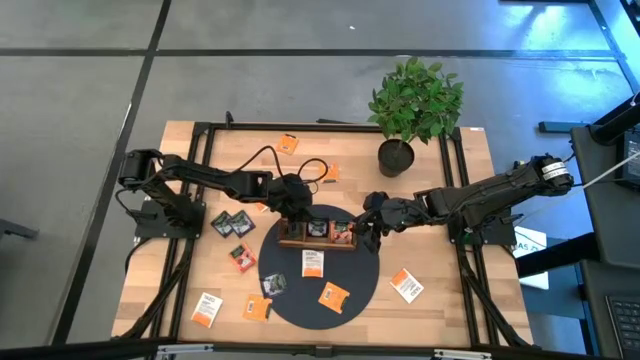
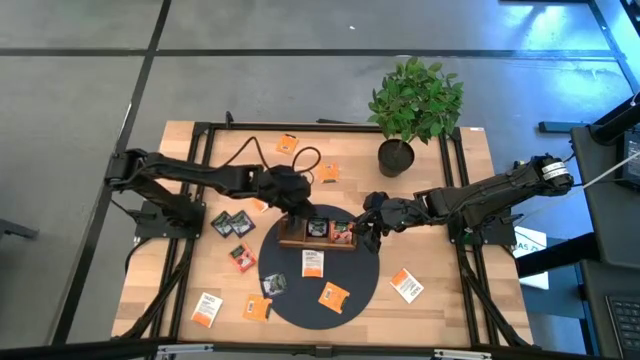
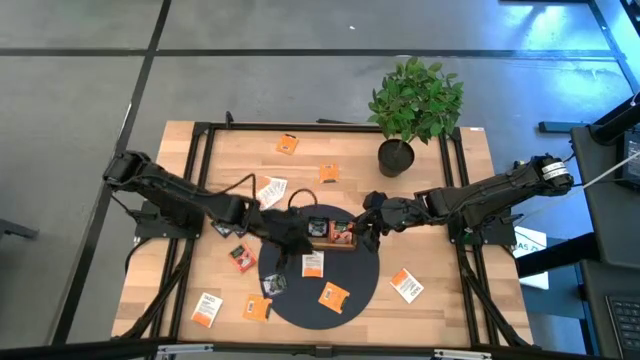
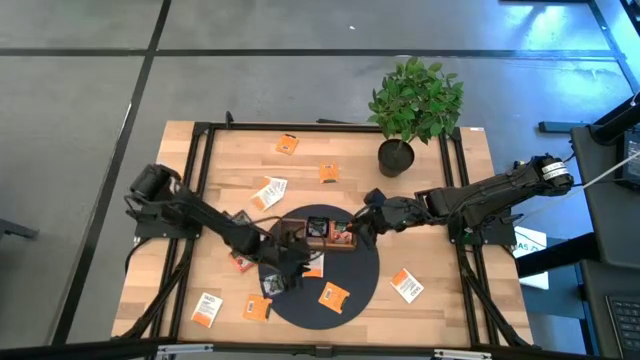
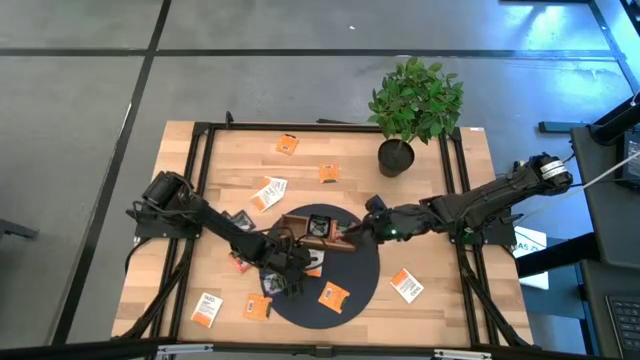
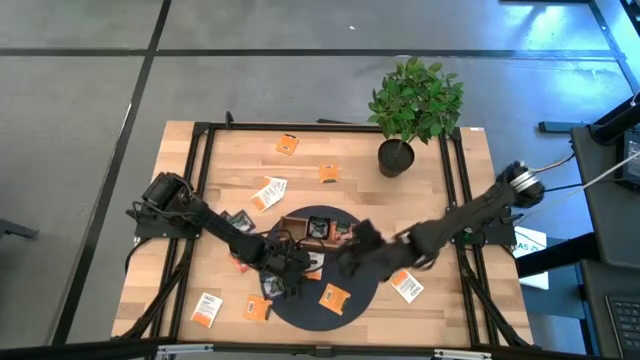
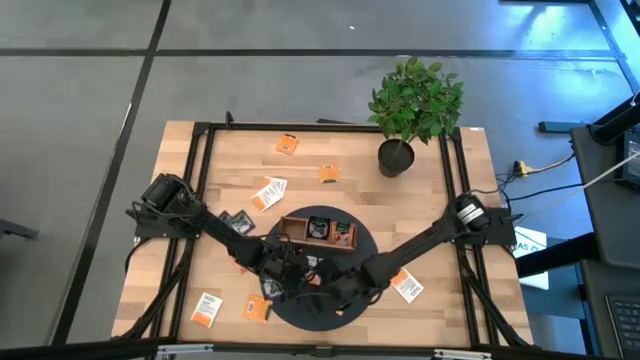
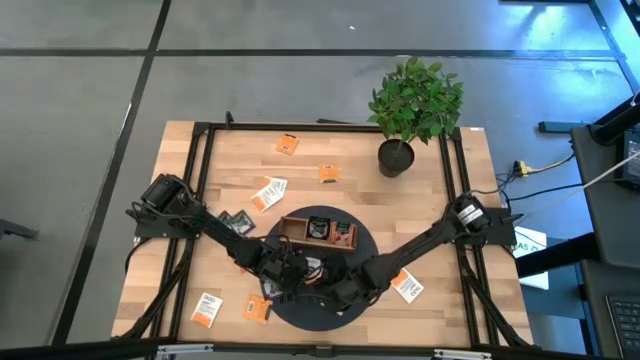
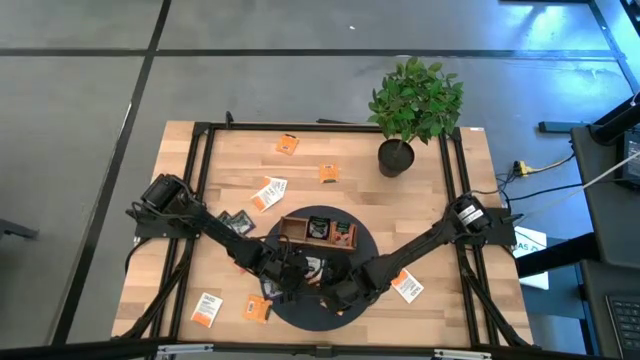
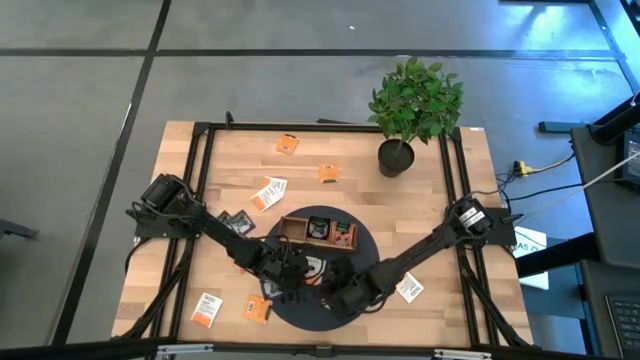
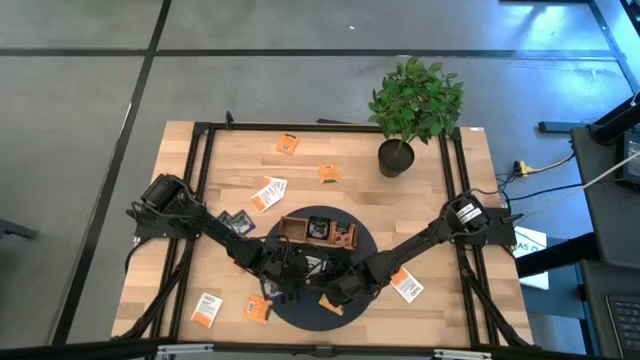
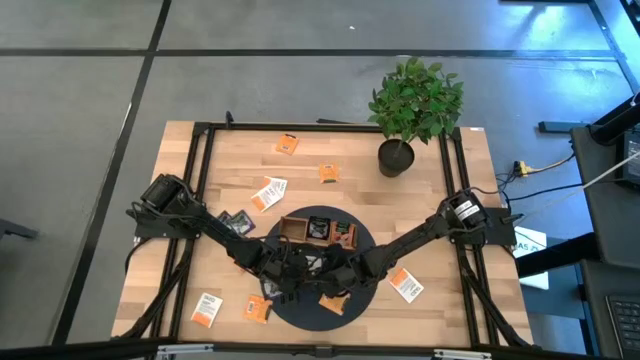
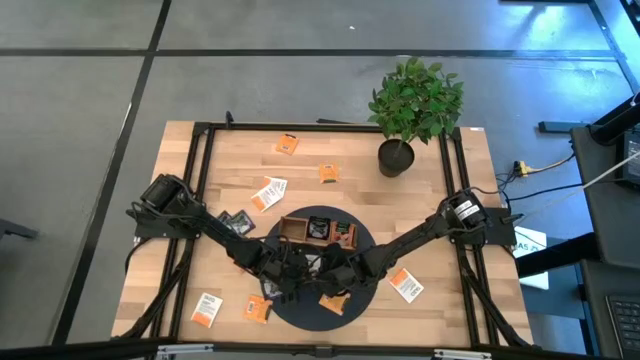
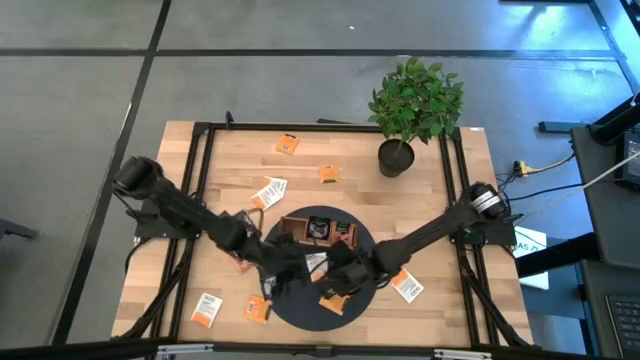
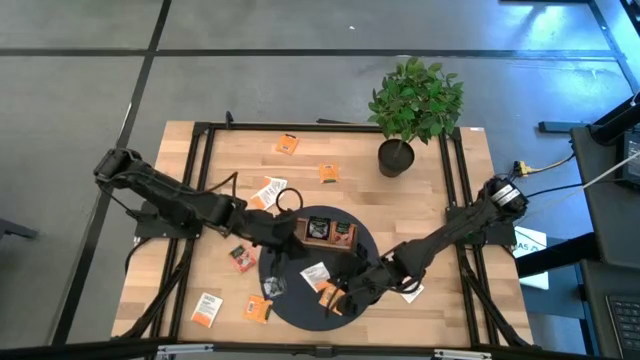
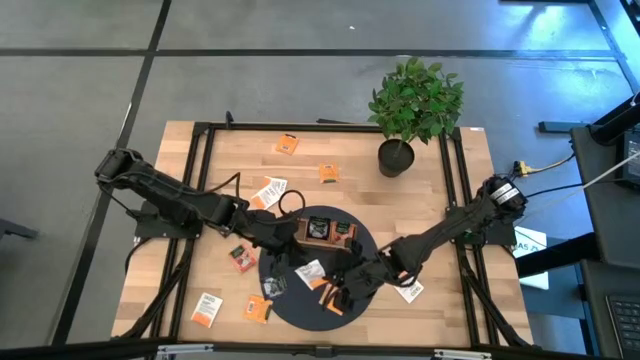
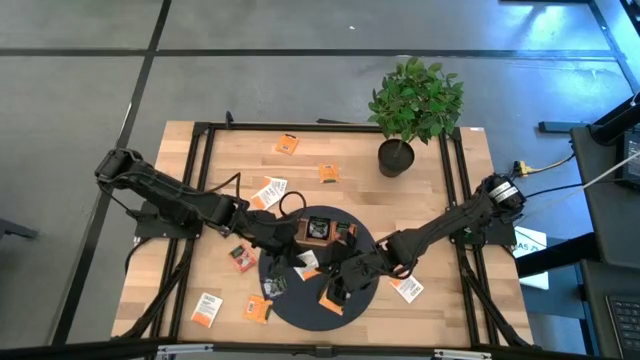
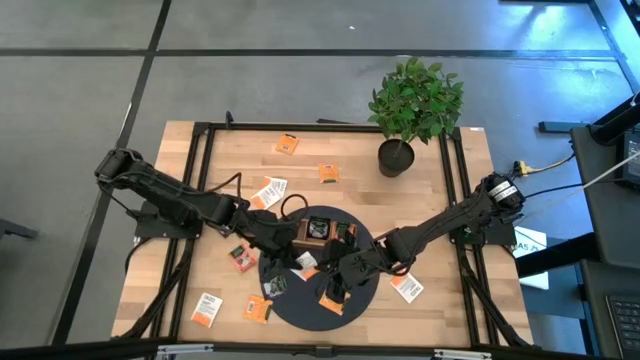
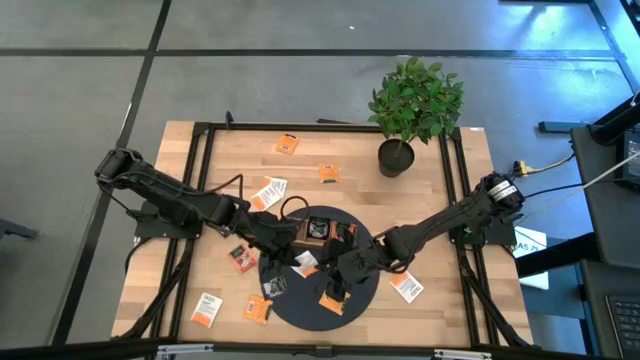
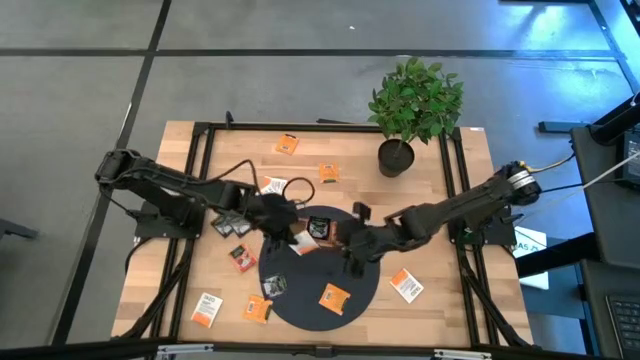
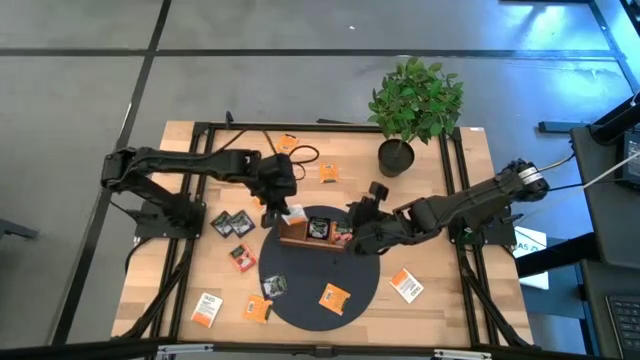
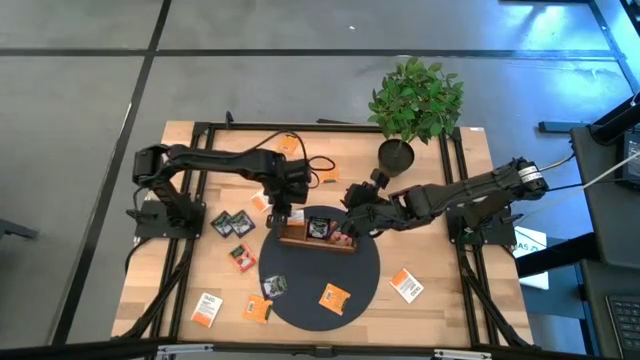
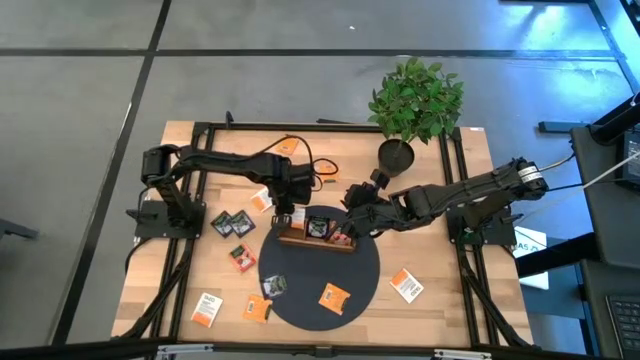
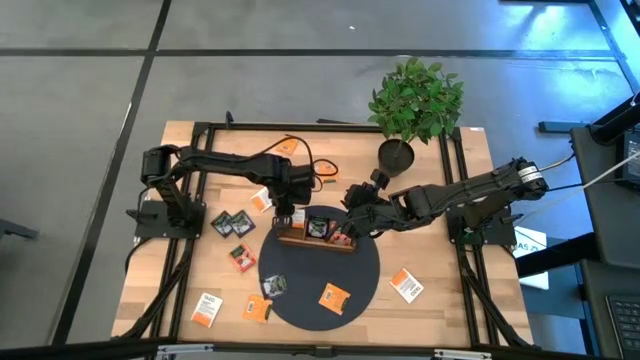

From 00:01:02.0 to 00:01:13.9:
Task: Pick & Place Tea
Put the white tea bag into the left section of the wooden organizer

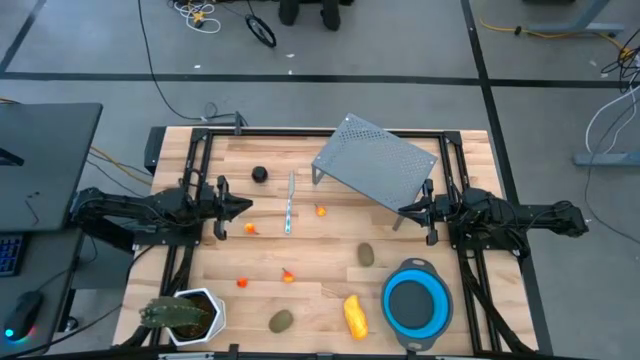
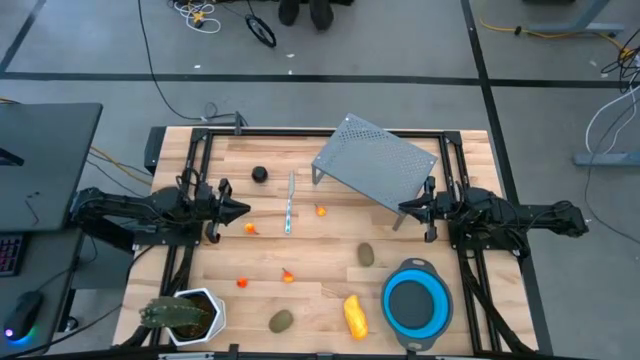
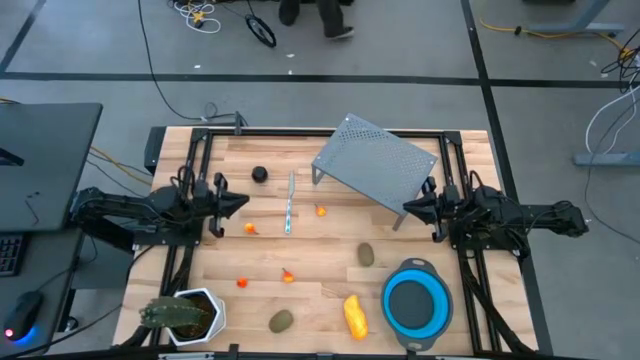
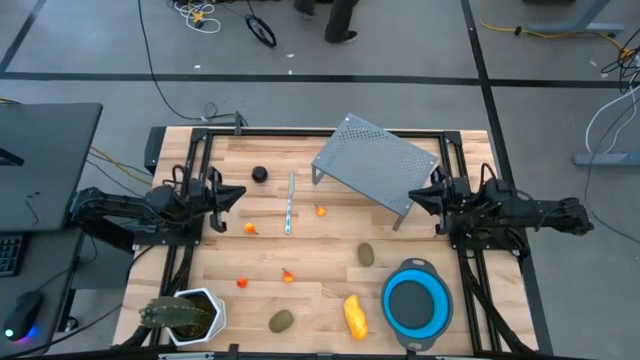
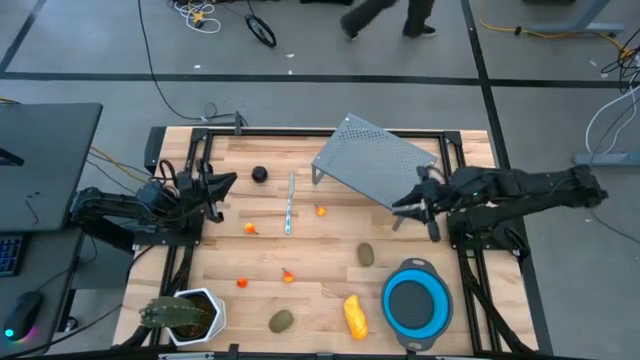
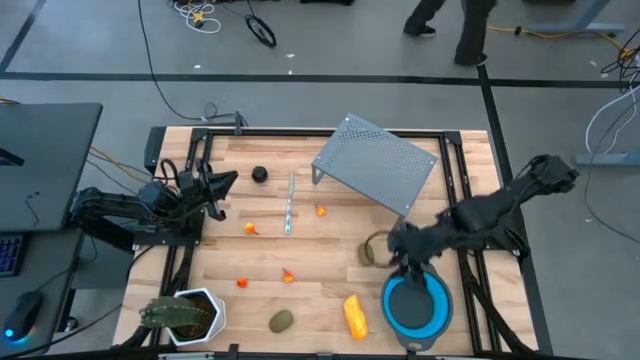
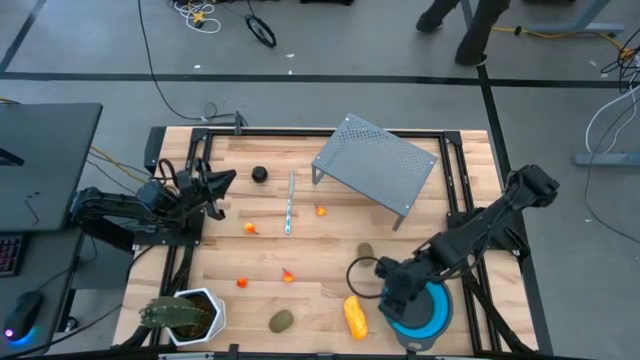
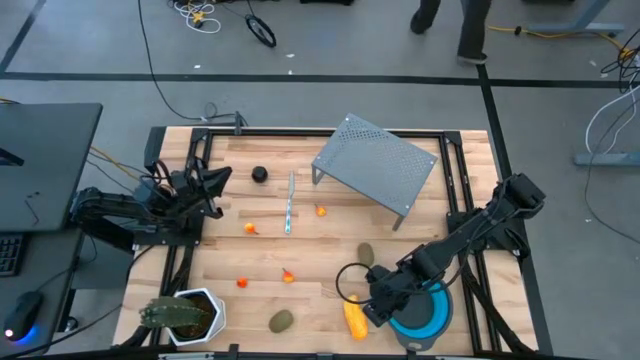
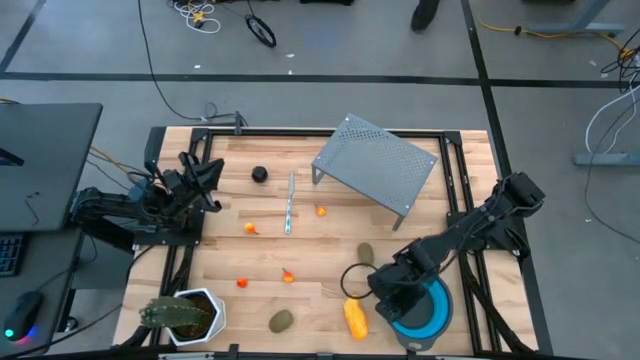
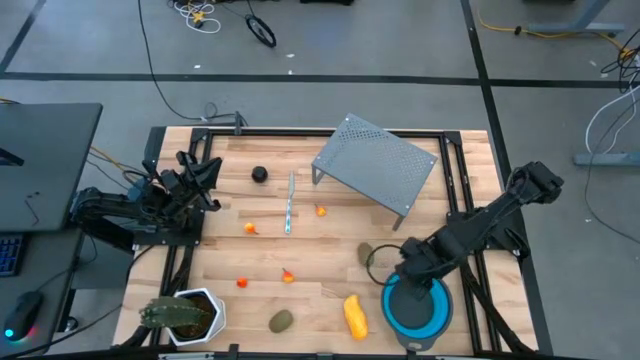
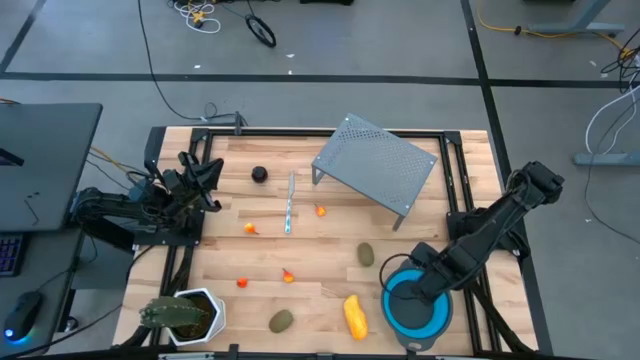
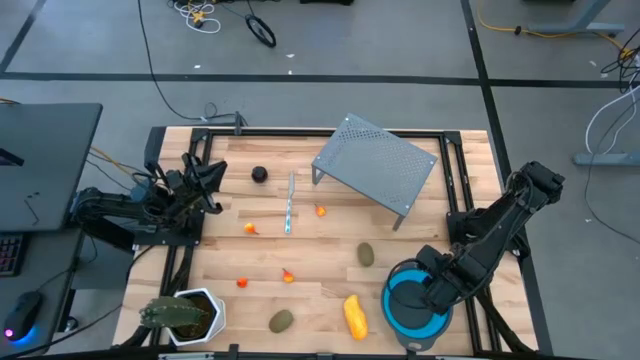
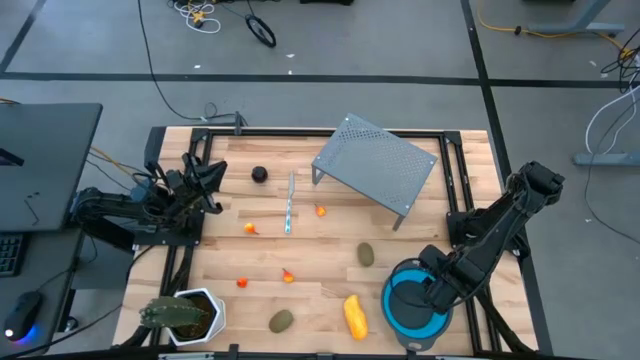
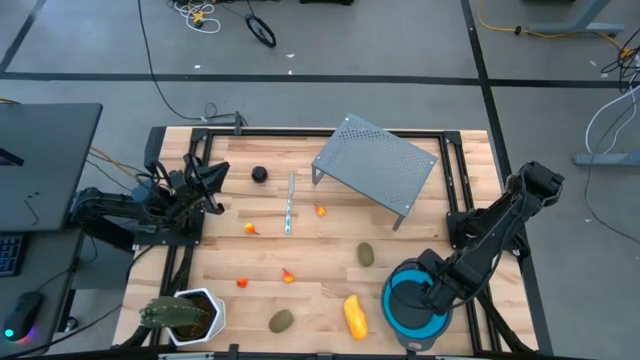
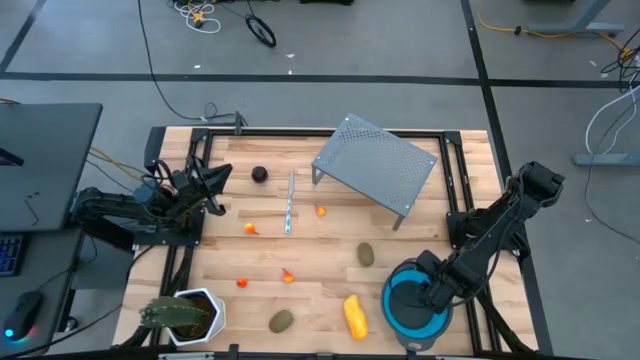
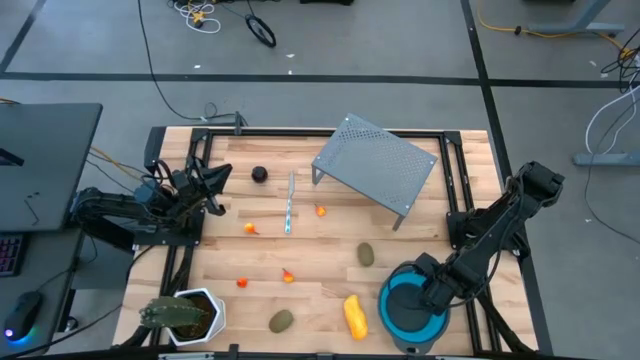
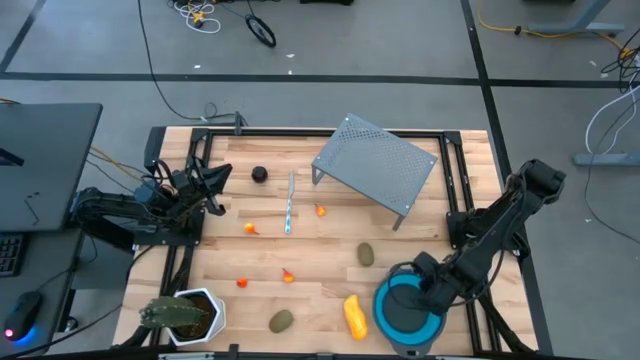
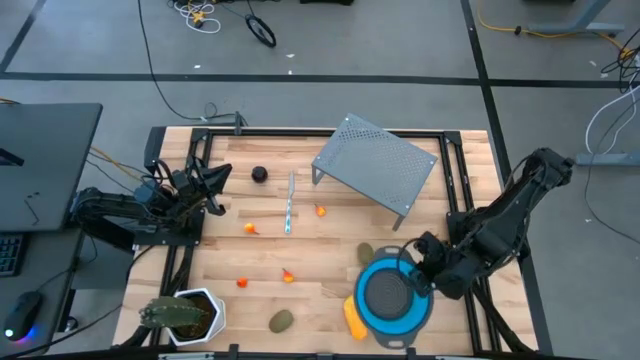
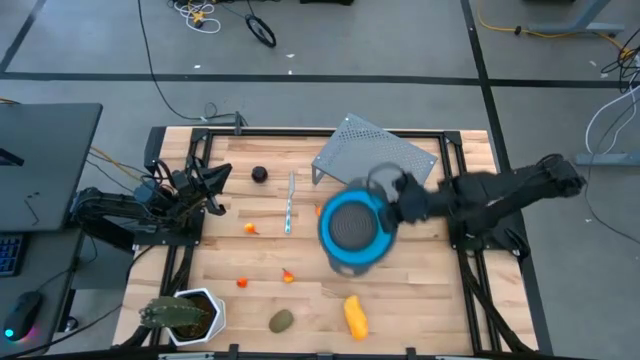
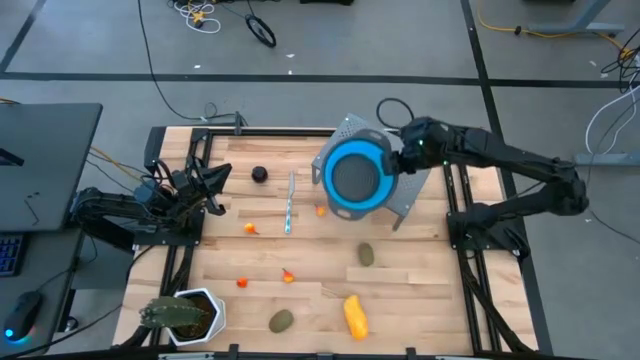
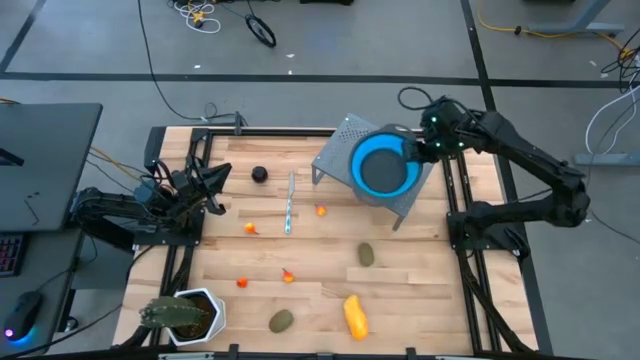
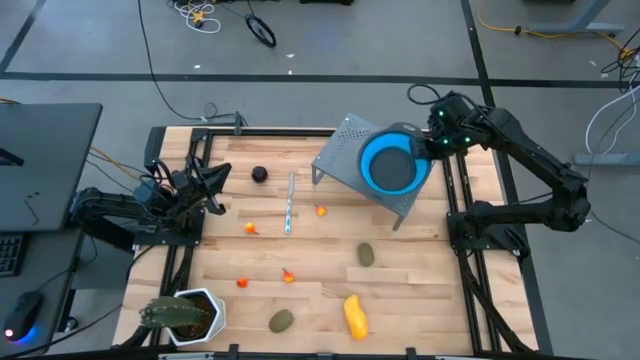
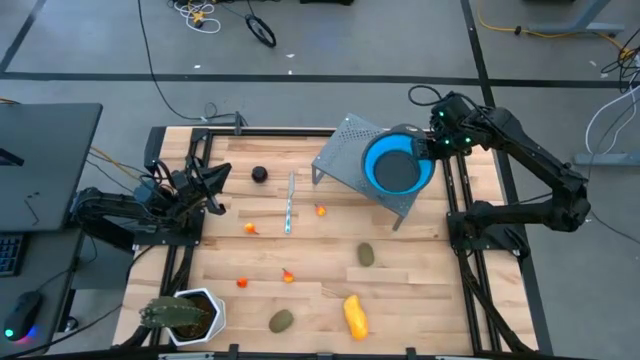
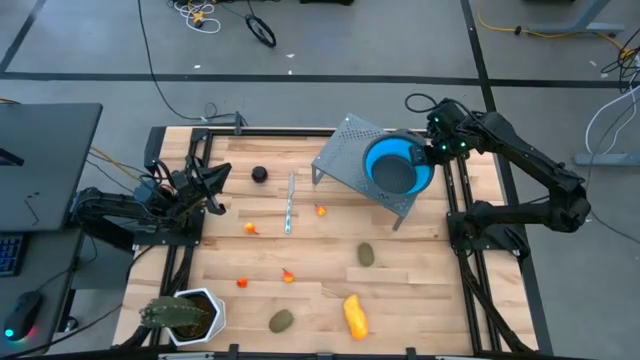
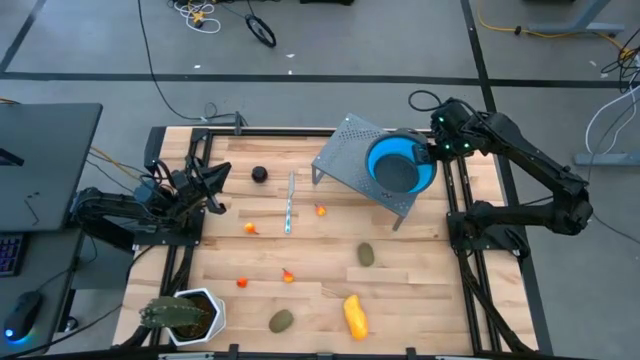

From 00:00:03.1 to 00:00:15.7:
Task: Pick & Place Fruit
Put the blue strainer bowl on the shelf
